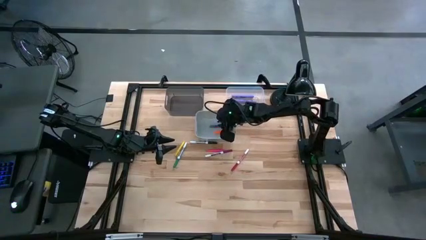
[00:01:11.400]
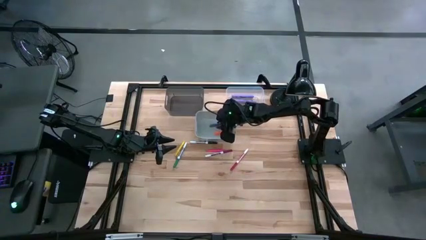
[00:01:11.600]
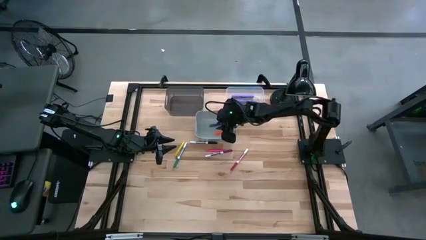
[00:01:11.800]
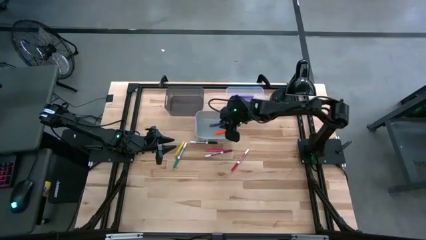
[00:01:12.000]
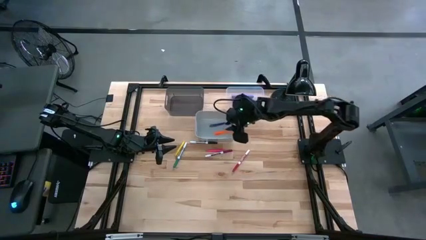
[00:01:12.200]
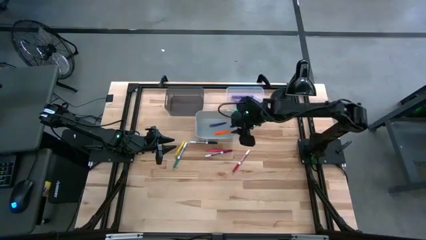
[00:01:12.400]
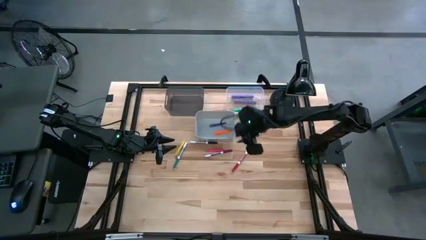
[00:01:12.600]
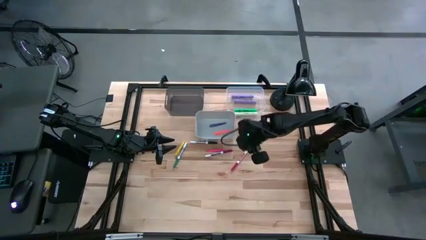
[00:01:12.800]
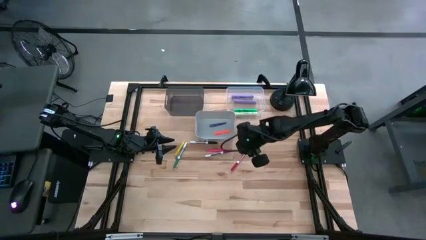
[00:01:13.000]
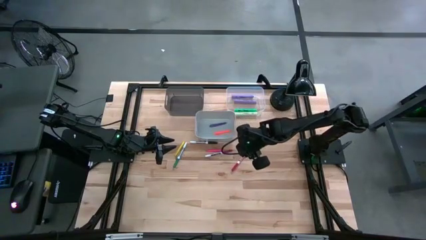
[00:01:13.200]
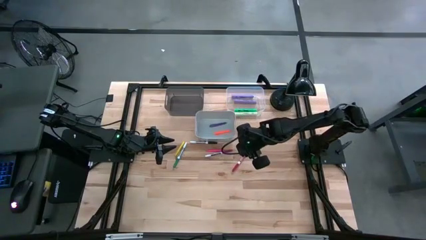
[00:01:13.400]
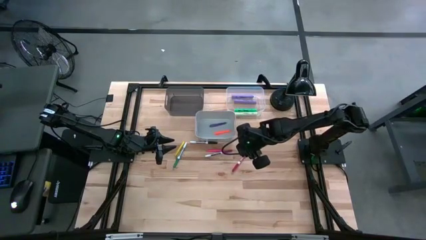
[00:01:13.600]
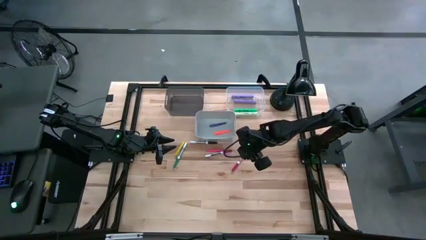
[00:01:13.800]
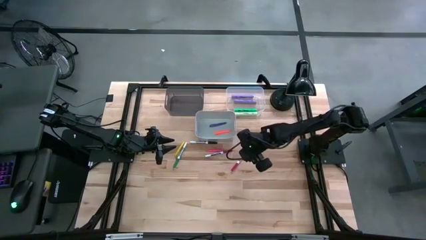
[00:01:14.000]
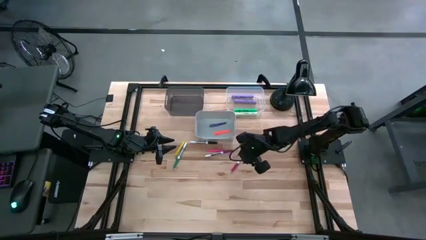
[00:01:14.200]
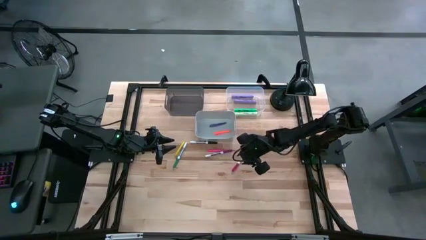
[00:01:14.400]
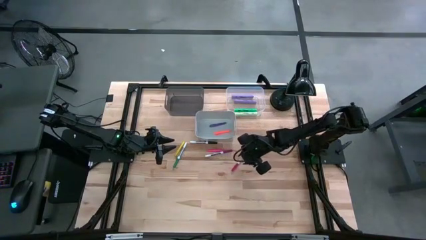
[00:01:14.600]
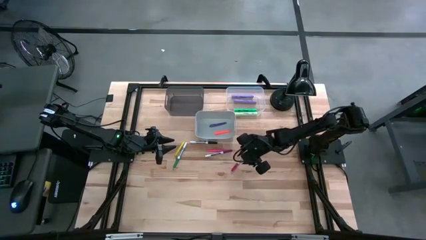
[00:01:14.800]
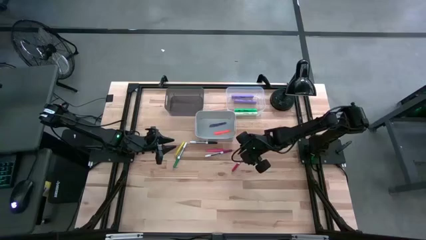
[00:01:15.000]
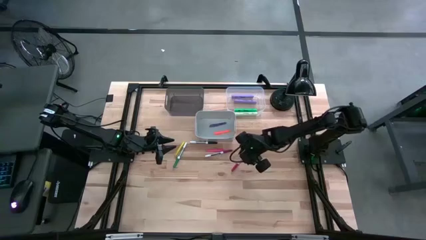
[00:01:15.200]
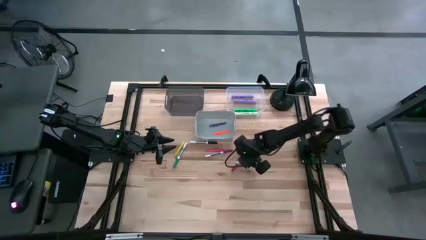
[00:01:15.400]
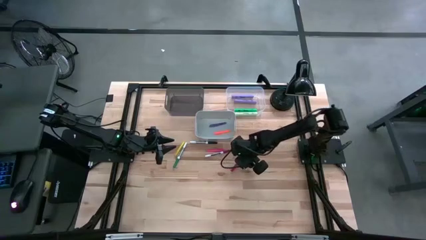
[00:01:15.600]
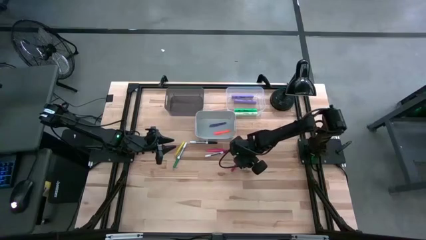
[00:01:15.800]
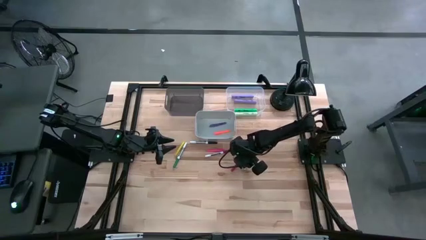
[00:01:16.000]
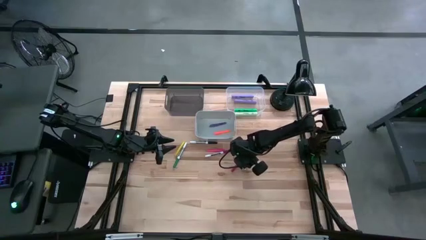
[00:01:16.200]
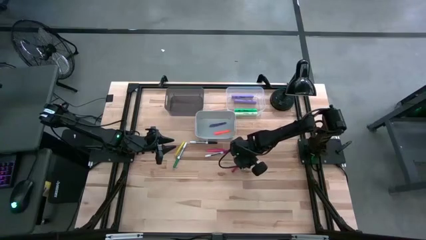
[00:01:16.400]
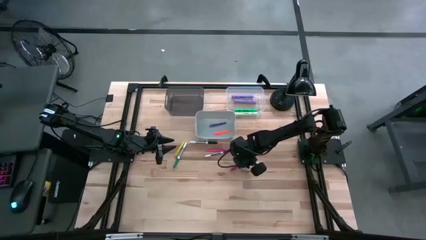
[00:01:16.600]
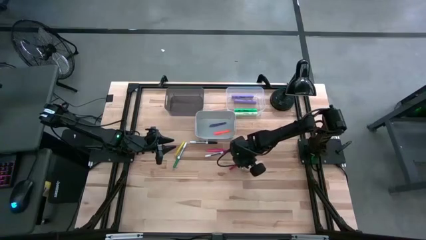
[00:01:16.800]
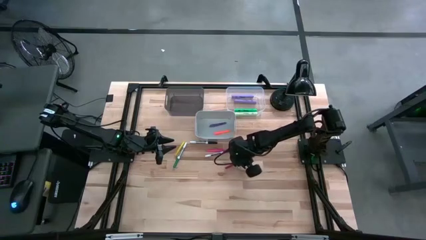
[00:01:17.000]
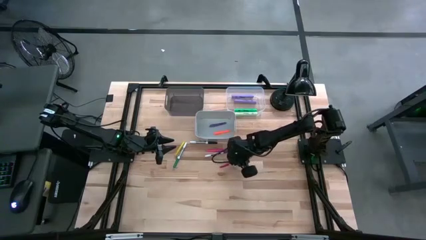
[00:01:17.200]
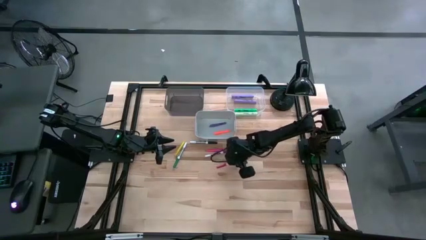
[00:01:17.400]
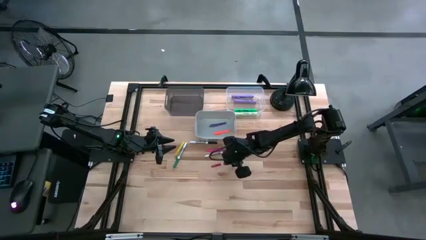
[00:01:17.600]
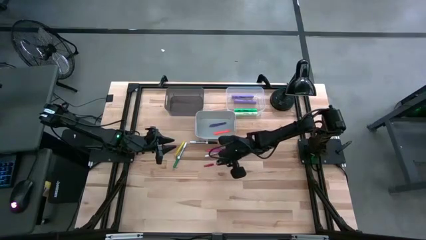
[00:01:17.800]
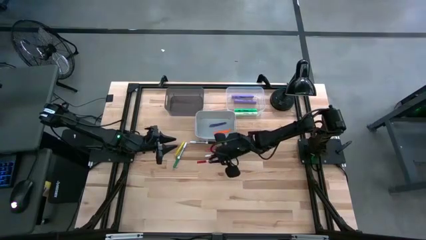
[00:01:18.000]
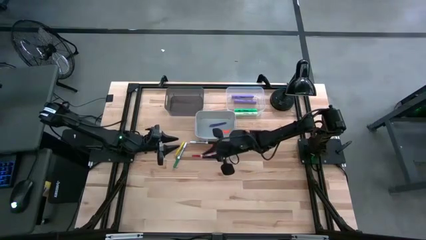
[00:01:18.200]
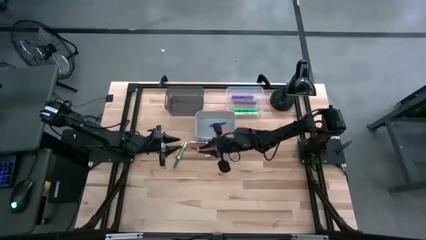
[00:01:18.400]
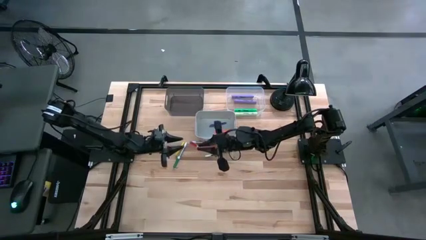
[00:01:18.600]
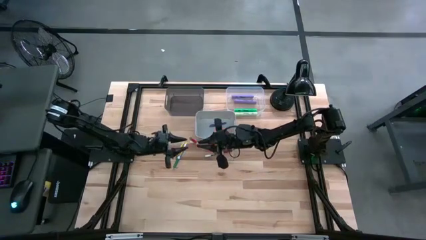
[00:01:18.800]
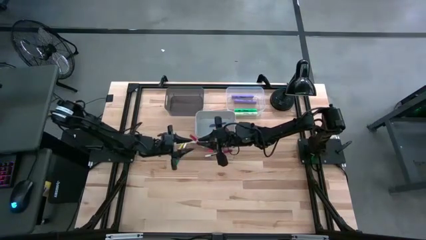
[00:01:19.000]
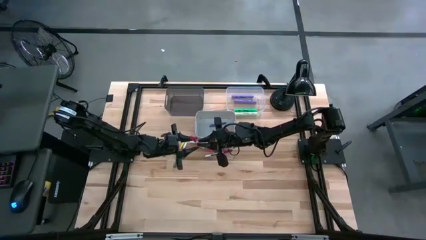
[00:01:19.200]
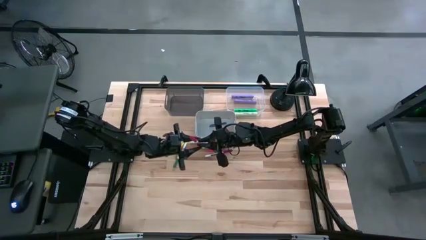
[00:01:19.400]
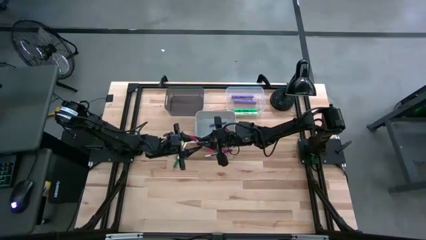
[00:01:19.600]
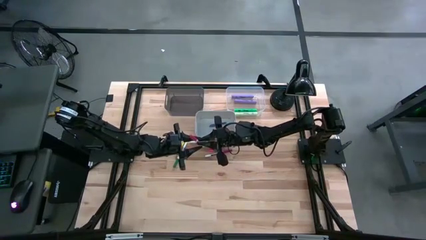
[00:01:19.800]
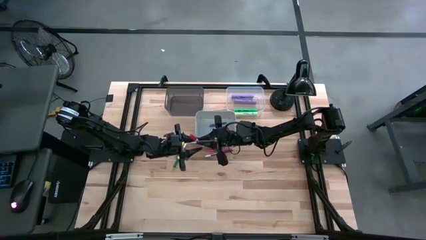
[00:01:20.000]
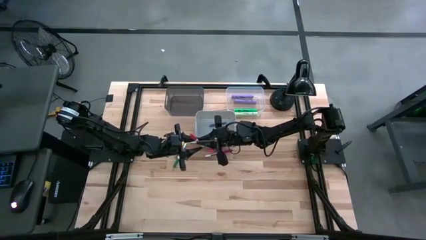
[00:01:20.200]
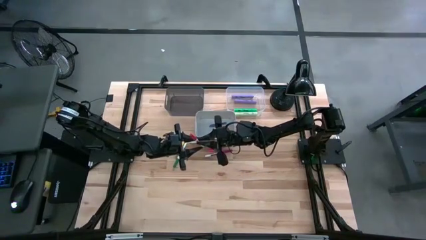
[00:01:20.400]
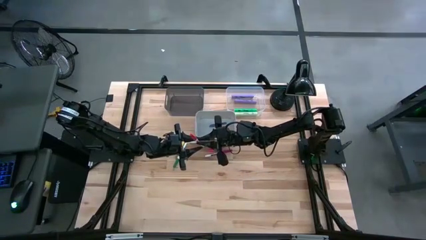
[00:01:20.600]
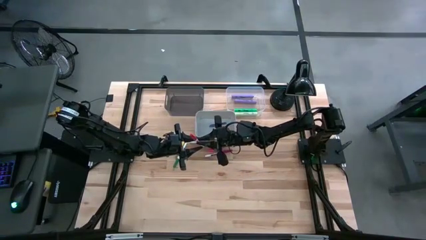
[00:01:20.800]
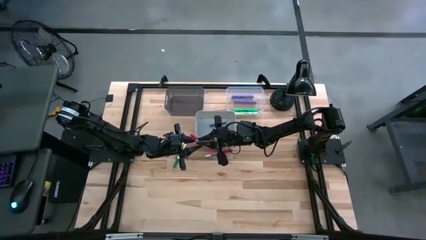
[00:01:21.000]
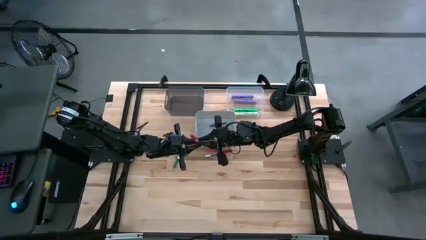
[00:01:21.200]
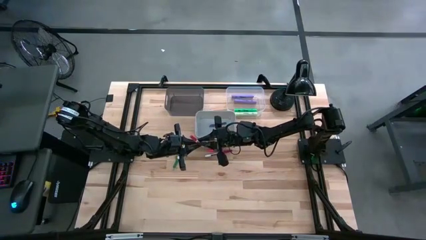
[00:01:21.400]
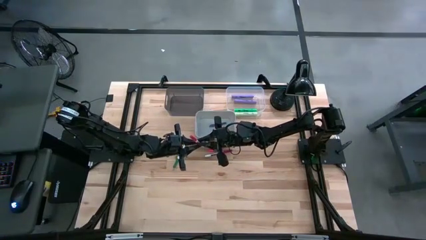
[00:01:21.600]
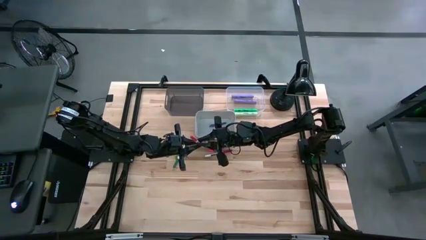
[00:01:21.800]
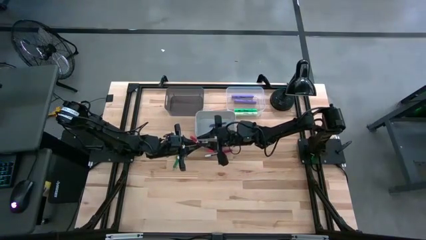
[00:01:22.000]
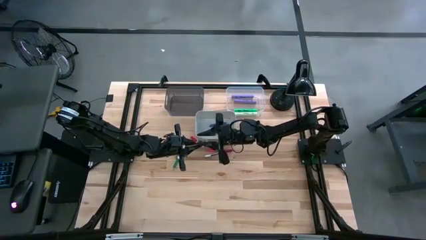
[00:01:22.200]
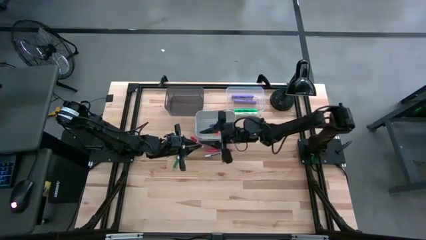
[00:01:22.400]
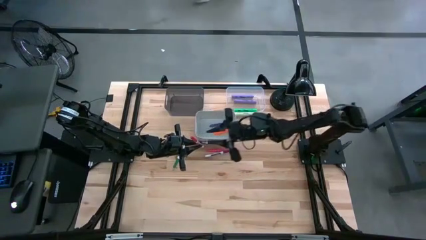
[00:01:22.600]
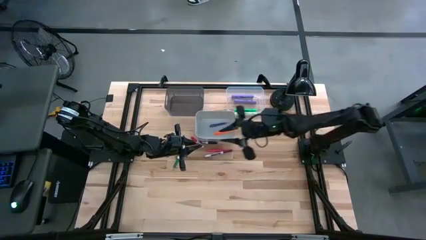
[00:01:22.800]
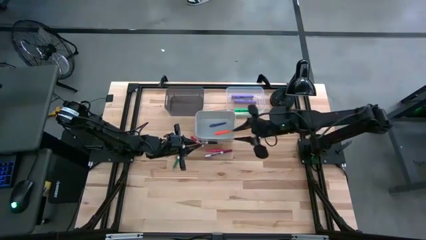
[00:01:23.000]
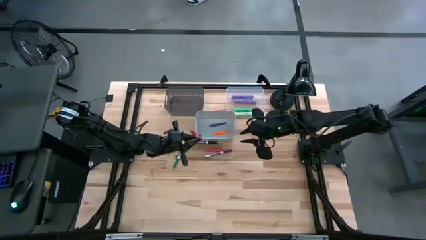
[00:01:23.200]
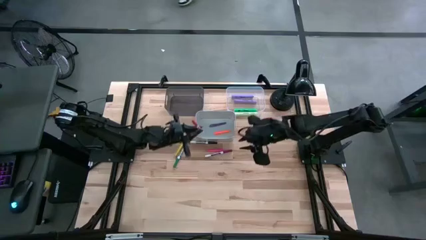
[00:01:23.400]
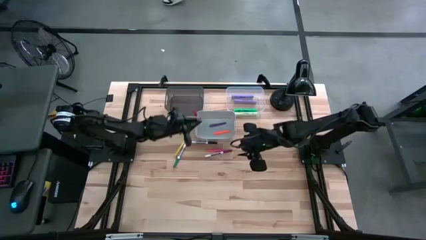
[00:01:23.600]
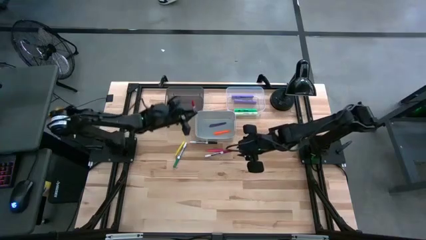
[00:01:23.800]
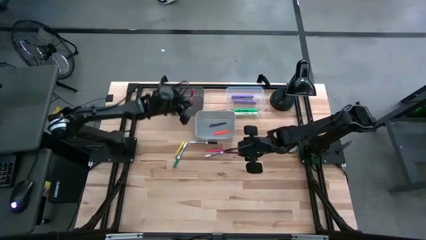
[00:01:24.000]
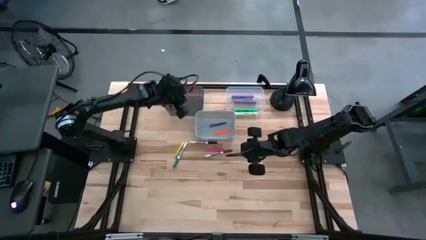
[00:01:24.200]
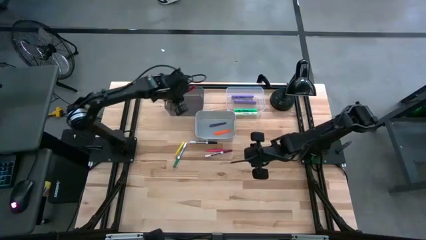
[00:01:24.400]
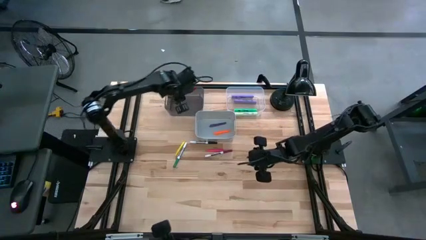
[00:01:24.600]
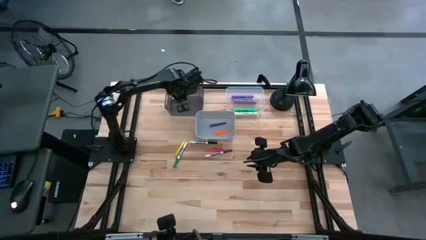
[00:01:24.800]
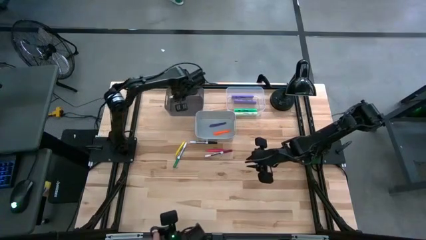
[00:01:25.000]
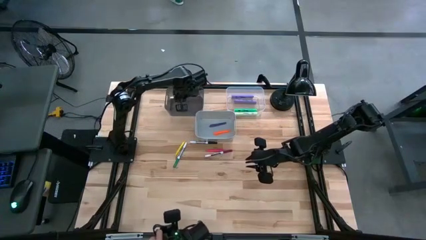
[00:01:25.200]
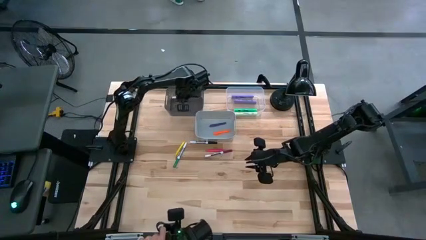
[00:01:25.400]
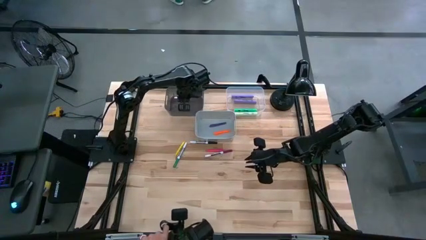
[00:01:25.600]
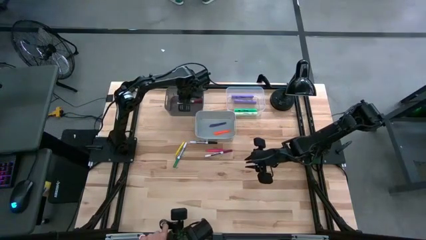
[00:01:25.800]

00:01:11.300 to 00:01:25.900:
Task: Pick & Place Markers
Put the red marker into the black bin

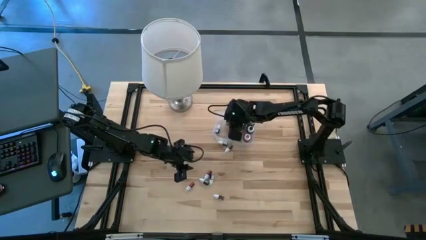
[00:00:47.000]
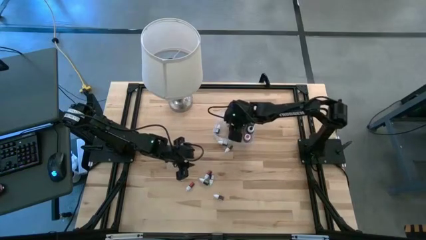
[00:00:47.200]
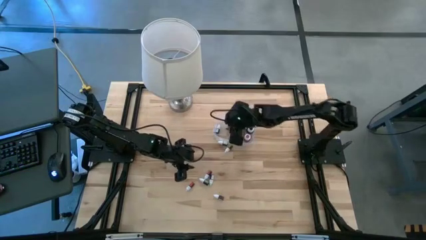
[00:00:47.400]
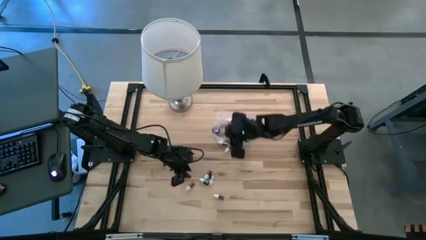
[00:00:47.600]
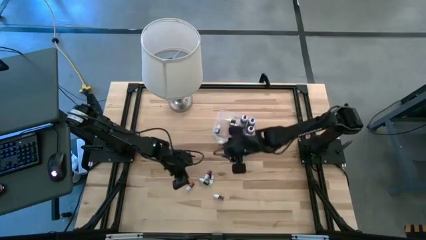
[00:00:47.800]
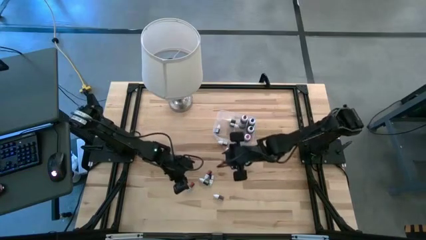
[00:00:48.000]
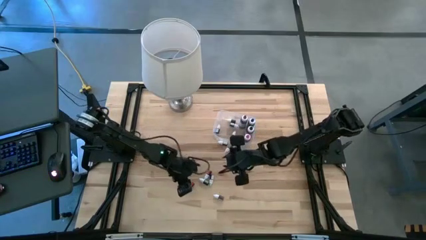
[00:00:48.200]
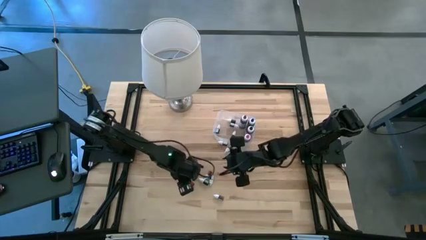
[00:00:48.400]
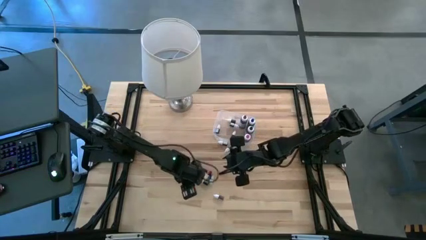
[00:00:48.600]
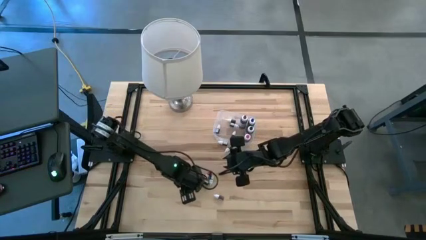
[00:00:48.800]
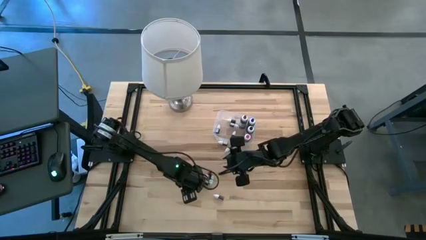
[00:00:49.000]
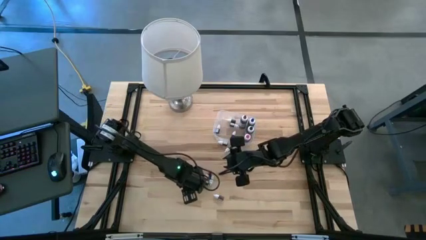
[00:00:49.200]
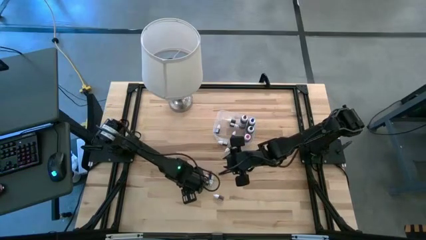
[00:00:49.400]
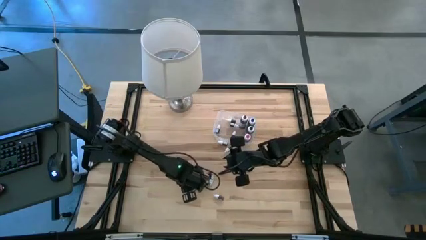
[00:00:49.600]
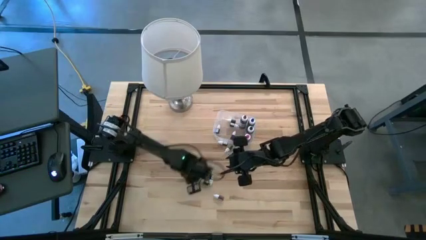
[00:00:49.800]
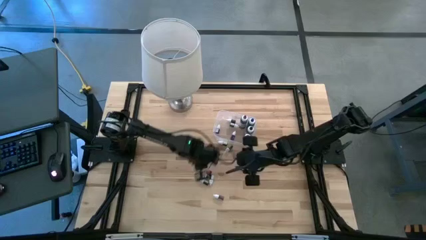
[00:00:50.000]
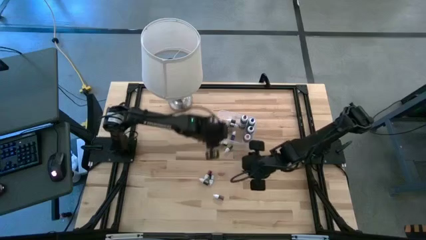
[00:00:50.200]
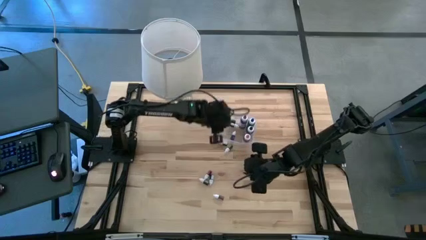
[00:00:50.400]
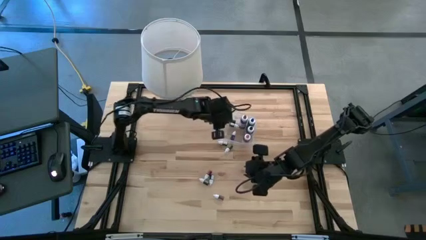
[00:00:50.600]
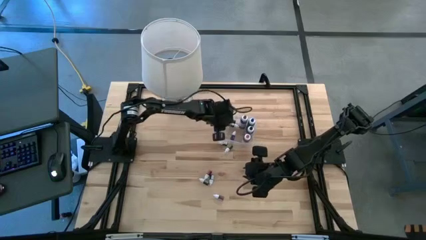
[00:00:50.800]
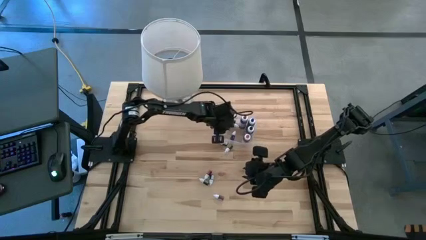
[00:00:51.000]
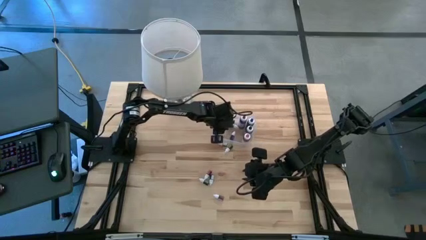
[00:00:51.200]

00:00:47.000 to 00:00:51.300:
Task: Pick & Place food coloring
Put the left small red food coloring bottle into the transparent bin
